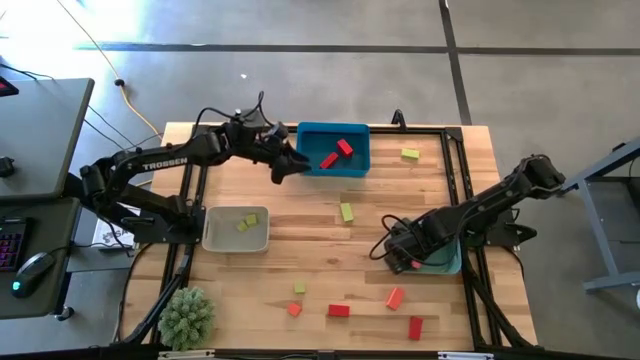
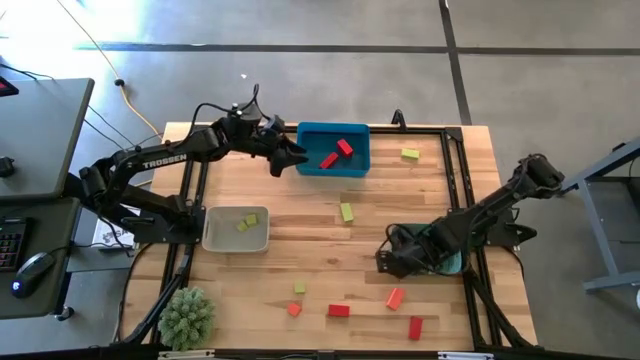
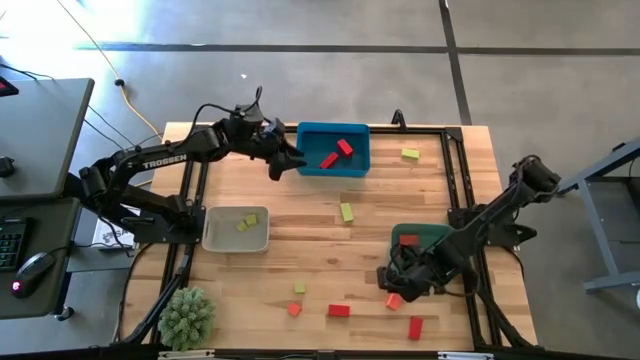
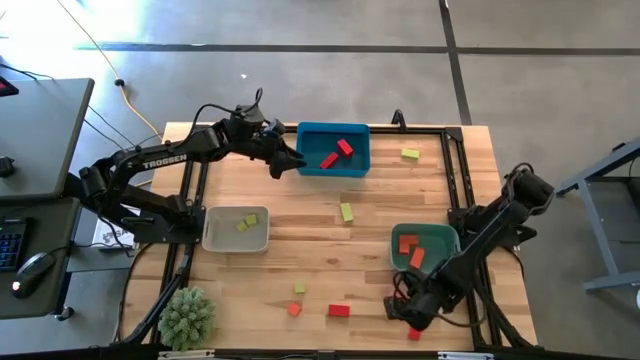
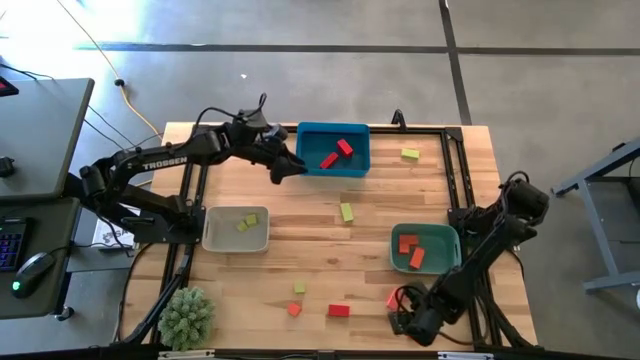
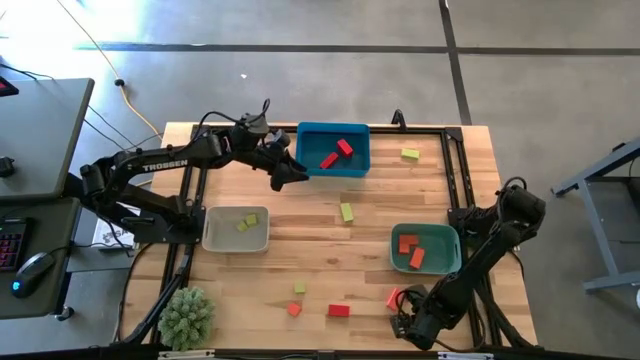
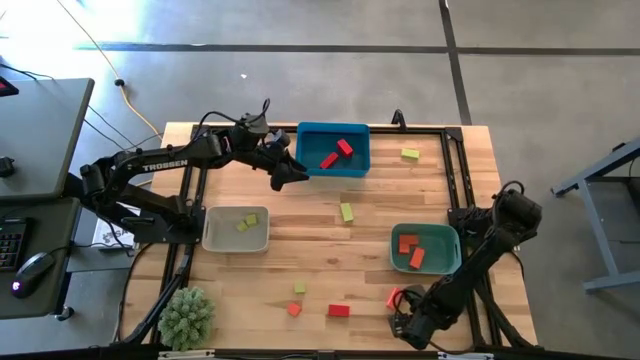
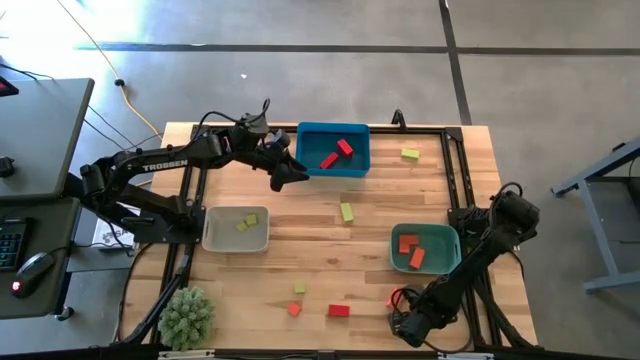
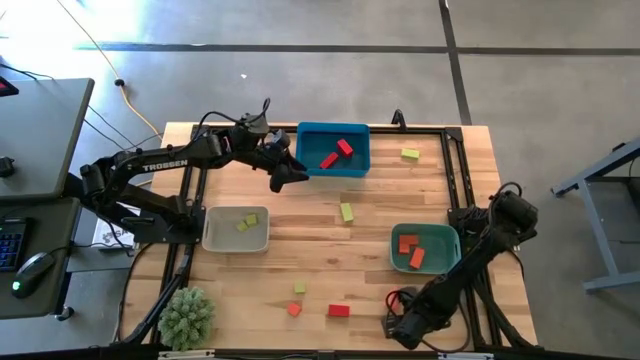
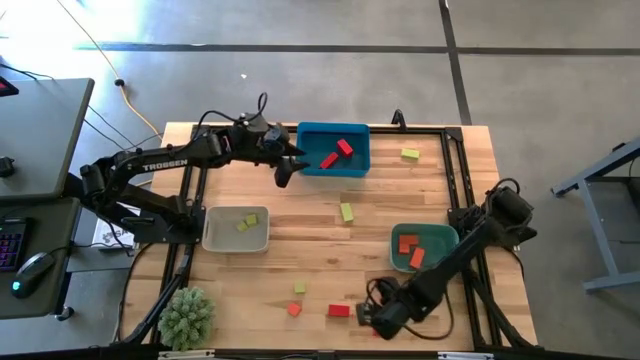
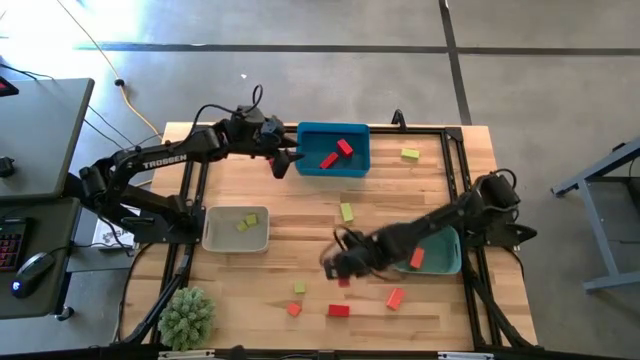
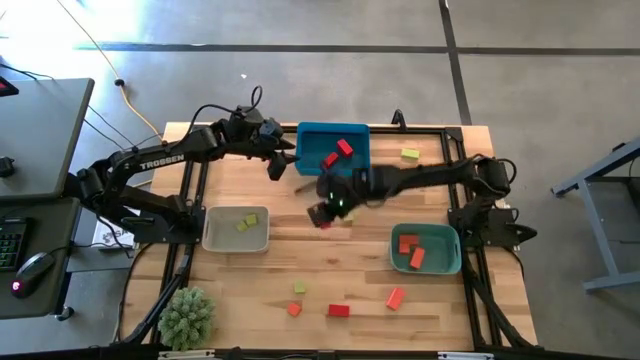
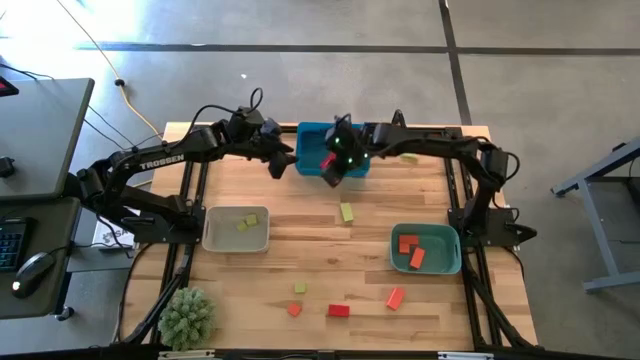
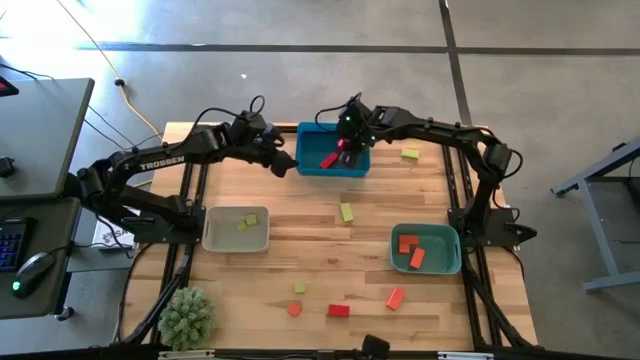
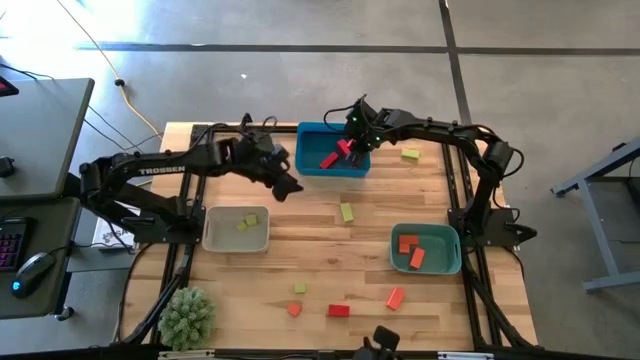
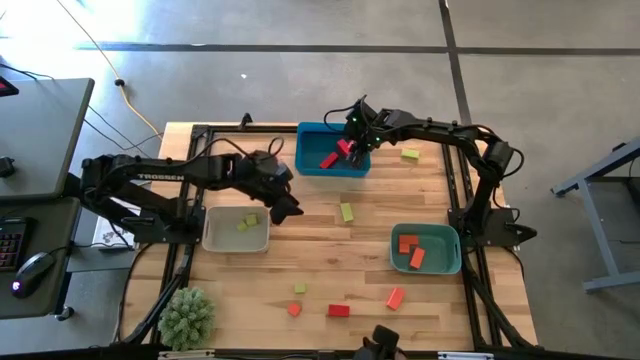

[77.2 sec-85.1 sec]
Task: Sort & place blocks by color
Put the bottom right red block into the blue bin

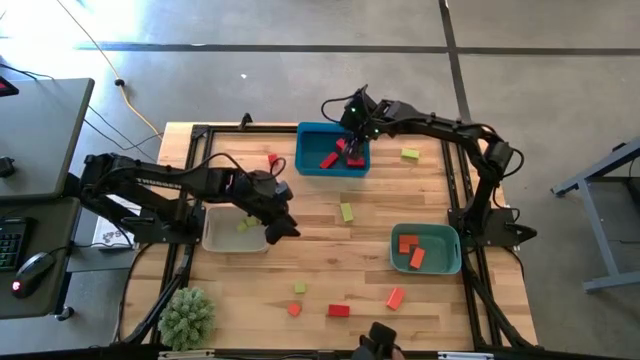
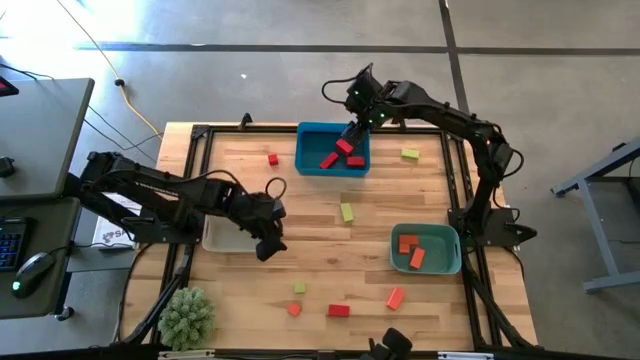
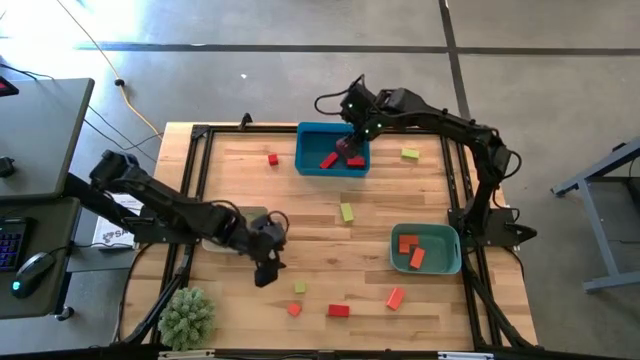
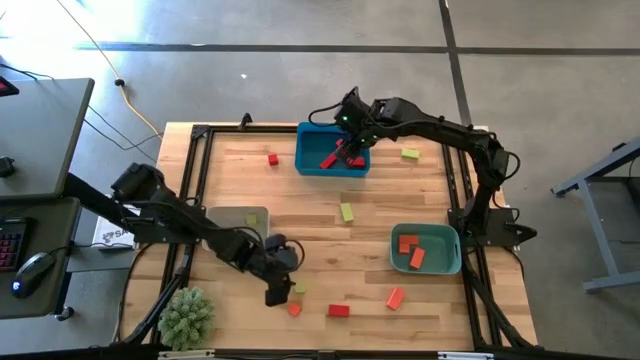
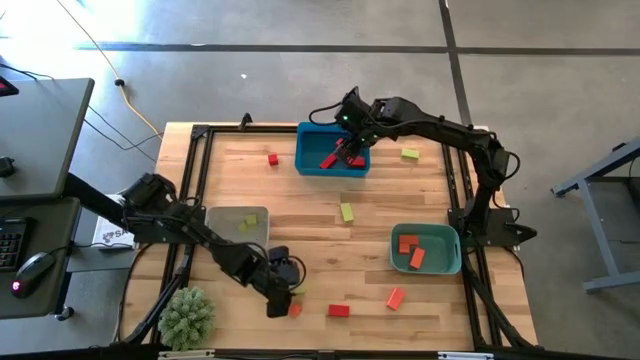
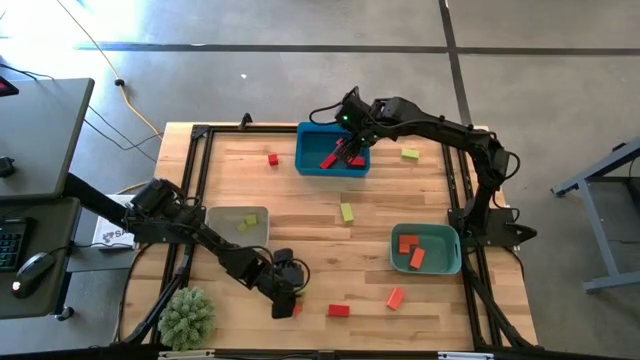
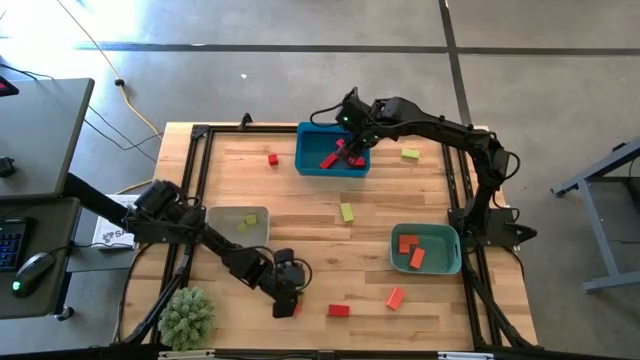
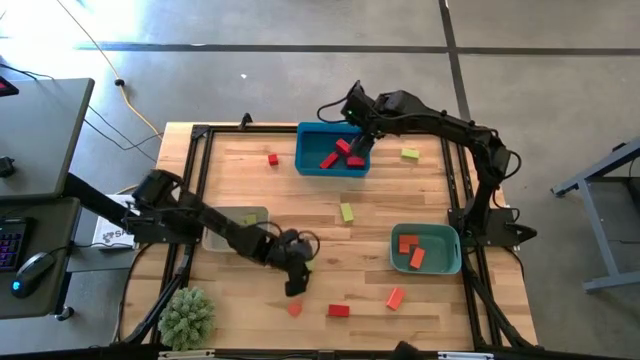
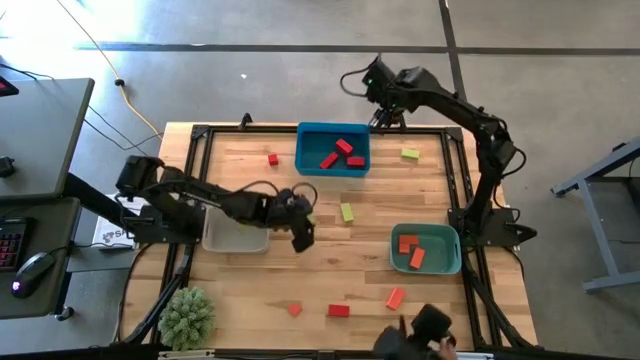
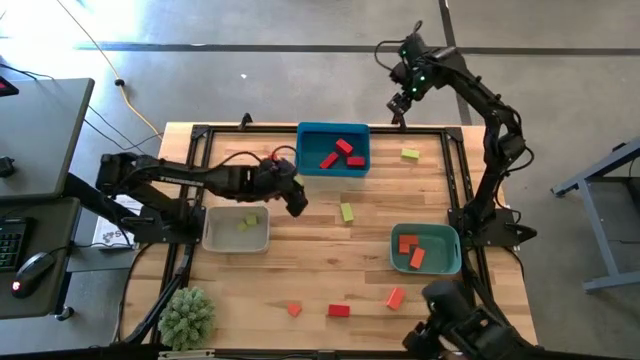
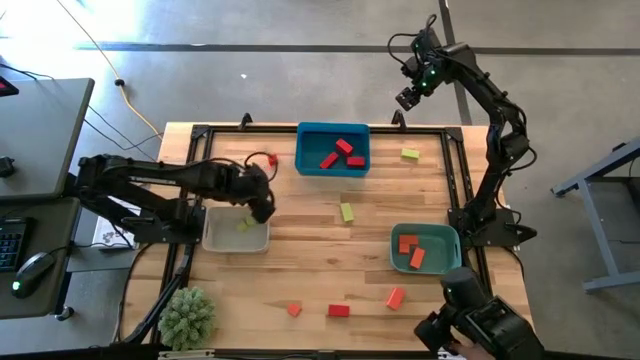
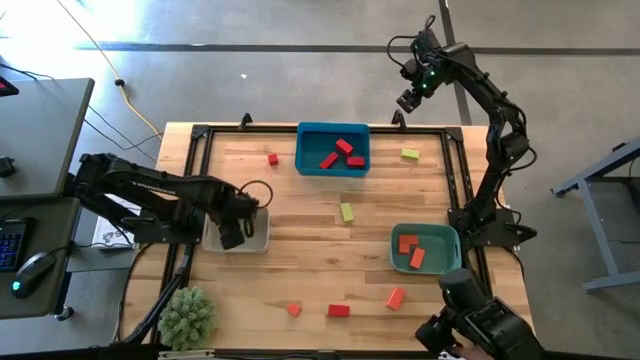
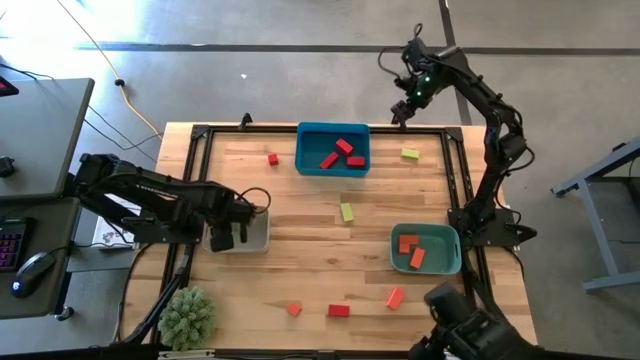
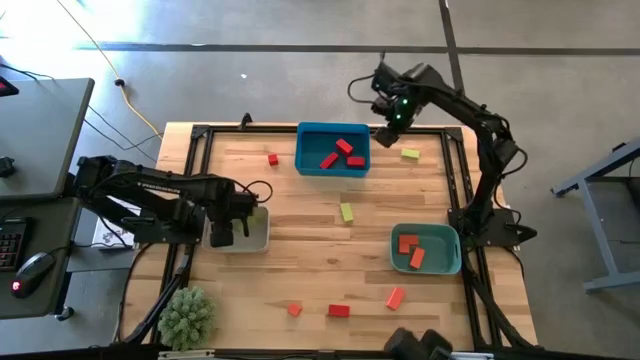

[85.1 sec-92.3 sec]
Put the bottom green block into the white bin

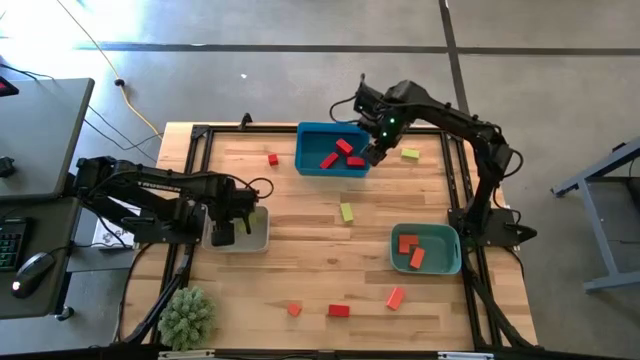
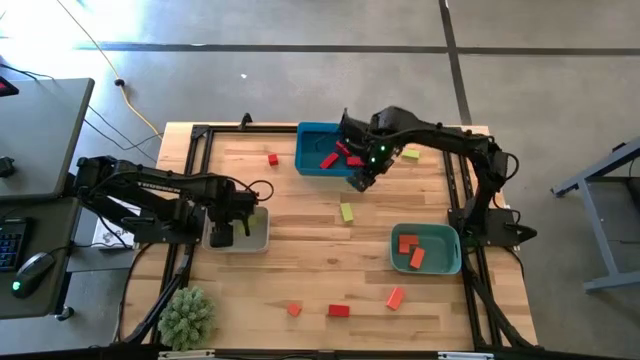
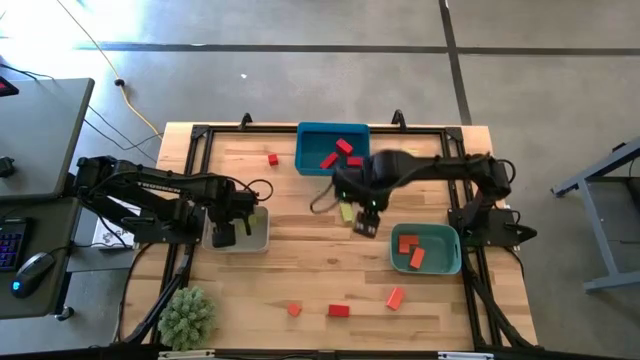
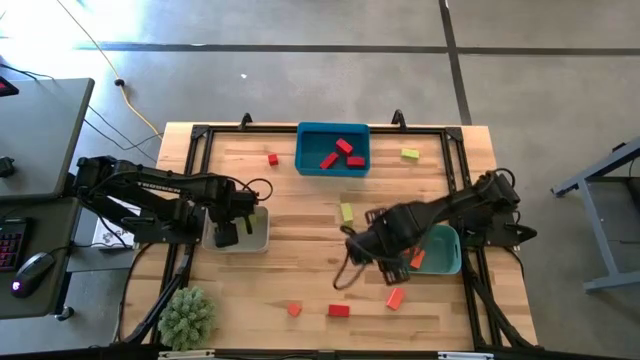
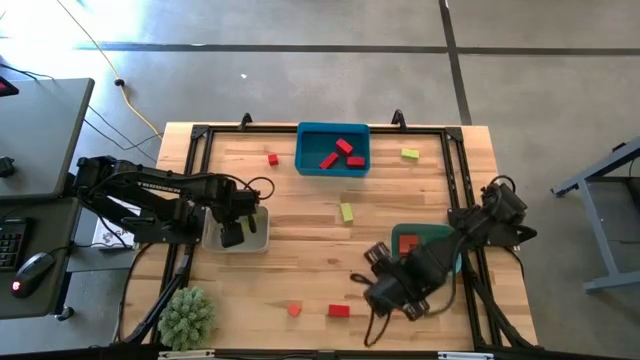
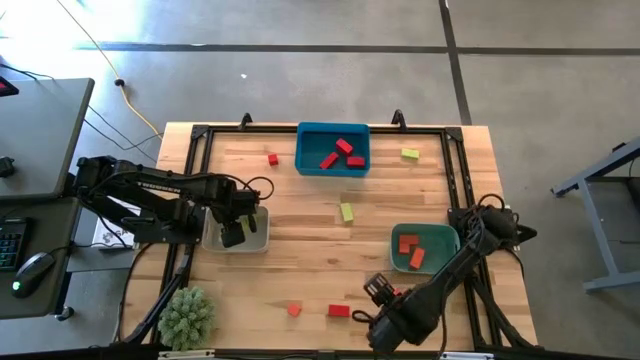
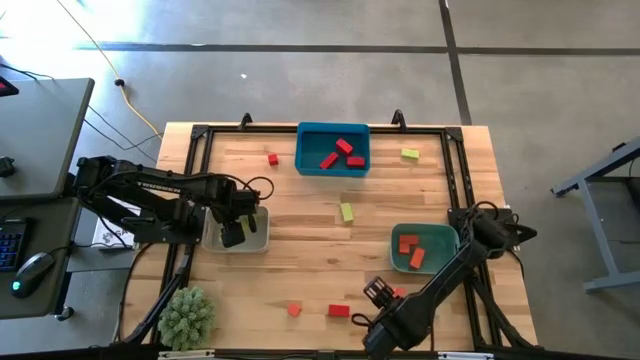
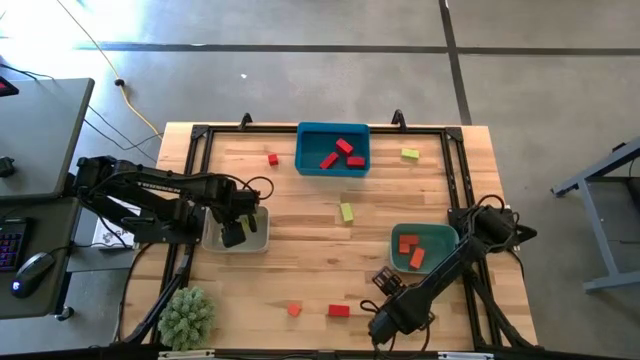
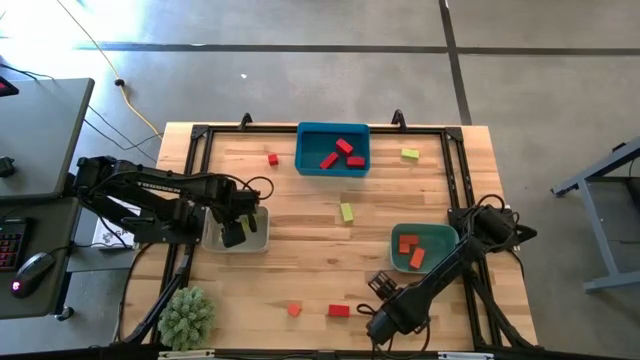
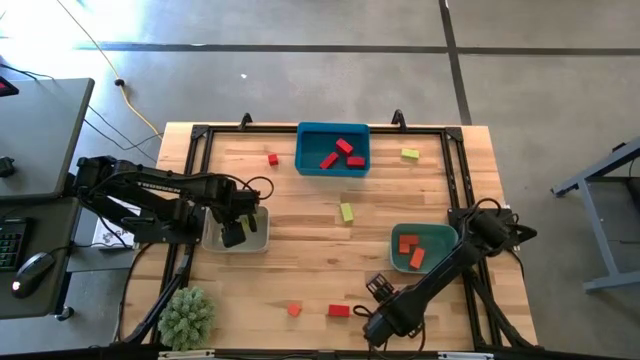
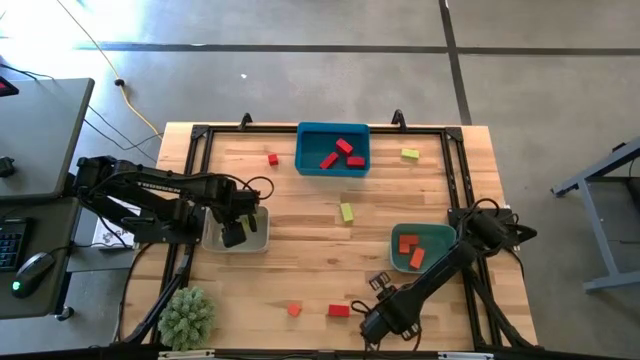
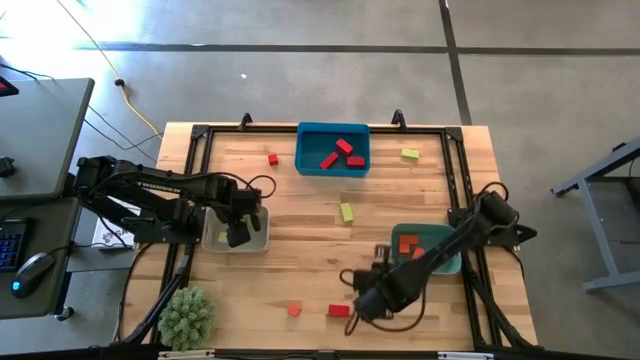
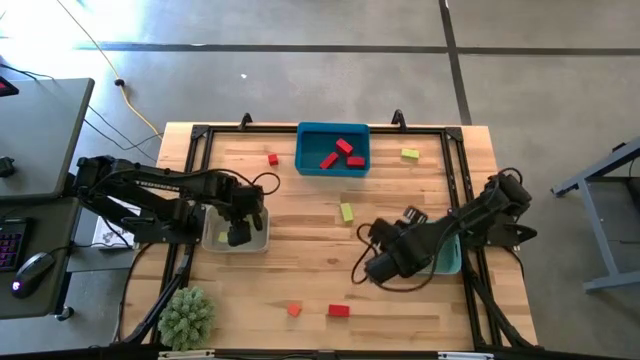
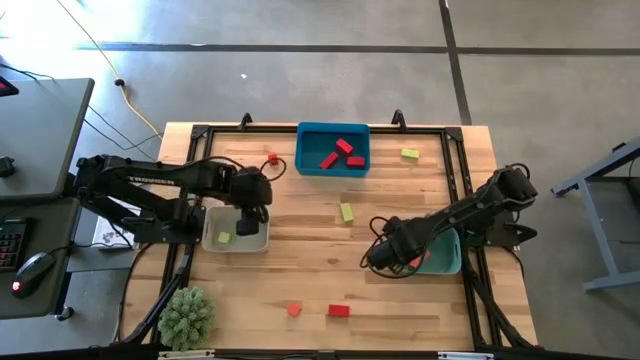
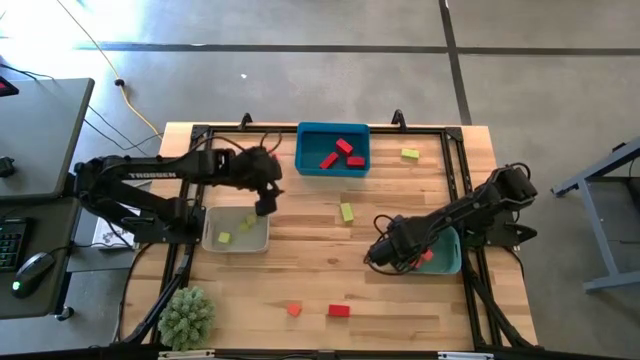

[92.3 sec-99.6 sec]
Put the right orange block into the green bin
